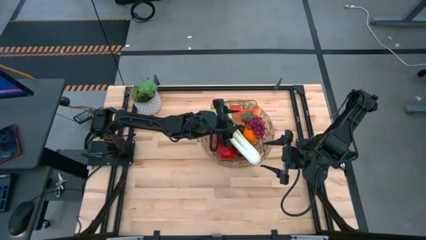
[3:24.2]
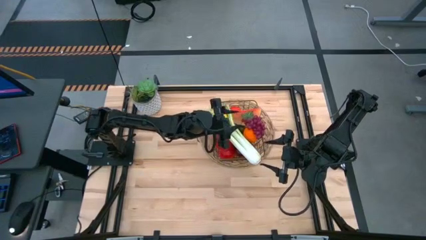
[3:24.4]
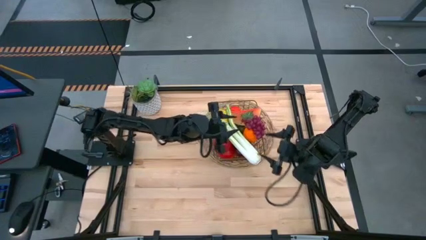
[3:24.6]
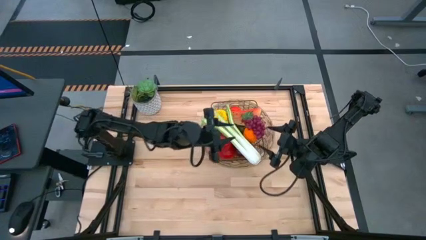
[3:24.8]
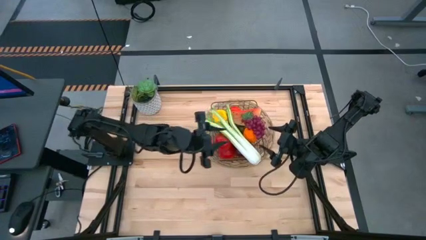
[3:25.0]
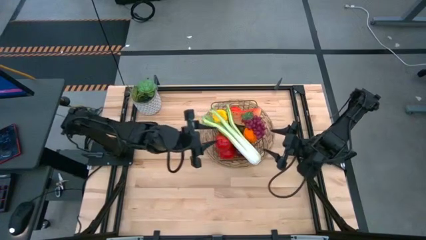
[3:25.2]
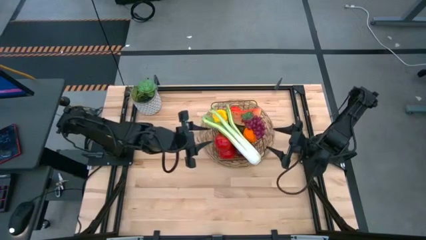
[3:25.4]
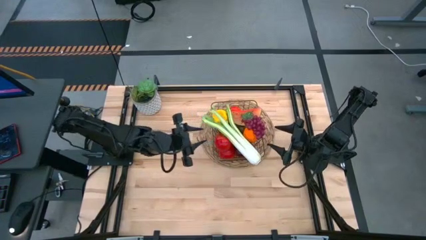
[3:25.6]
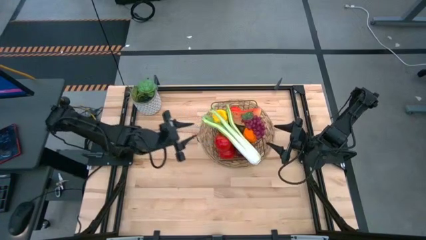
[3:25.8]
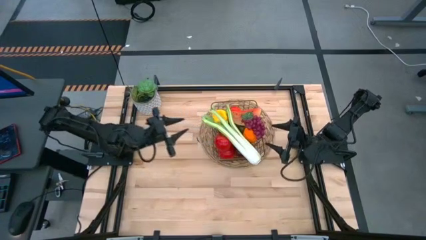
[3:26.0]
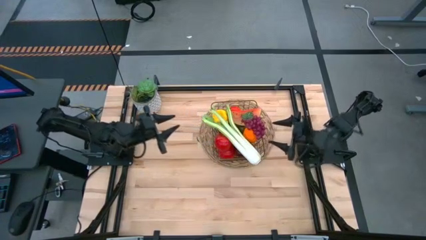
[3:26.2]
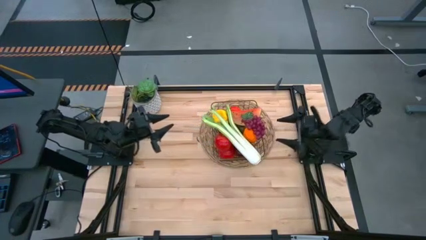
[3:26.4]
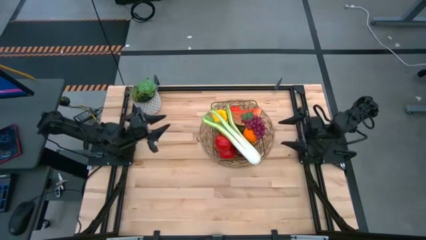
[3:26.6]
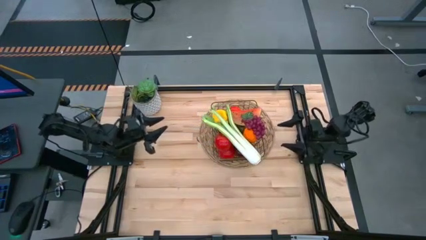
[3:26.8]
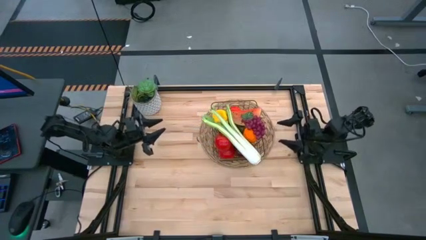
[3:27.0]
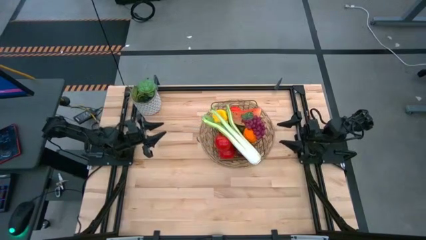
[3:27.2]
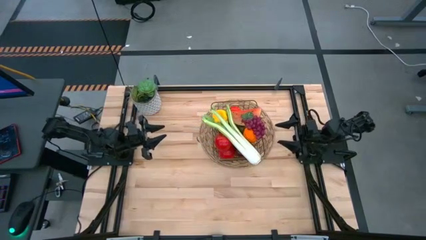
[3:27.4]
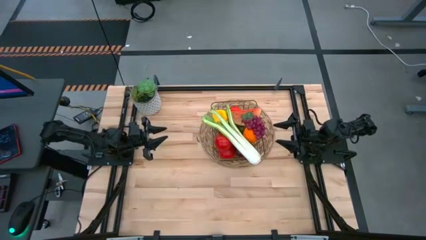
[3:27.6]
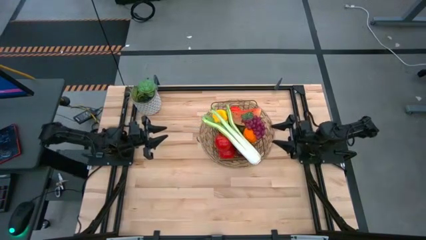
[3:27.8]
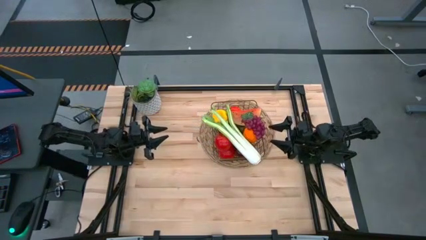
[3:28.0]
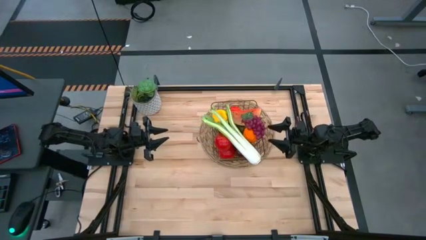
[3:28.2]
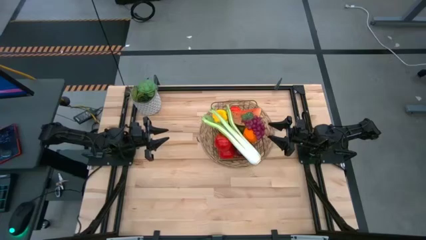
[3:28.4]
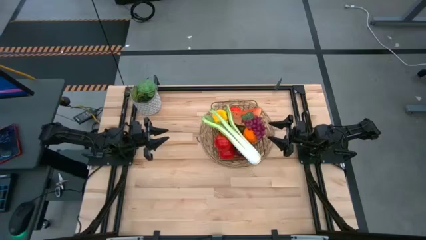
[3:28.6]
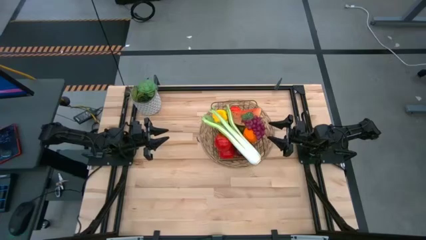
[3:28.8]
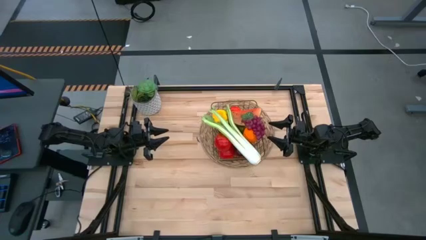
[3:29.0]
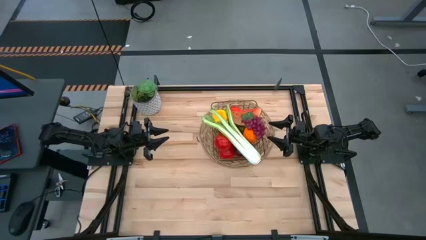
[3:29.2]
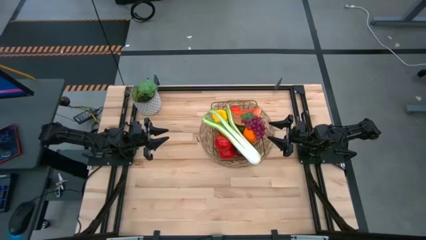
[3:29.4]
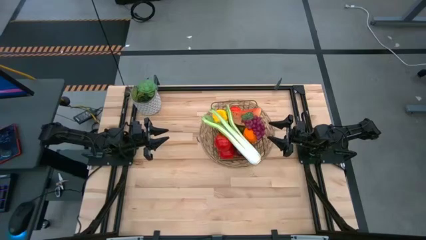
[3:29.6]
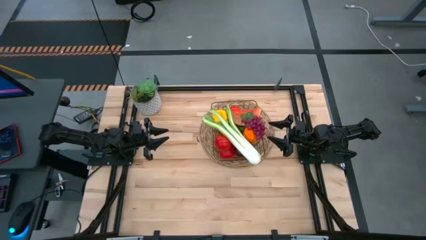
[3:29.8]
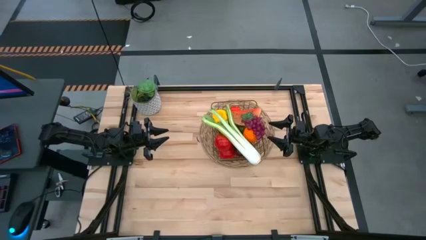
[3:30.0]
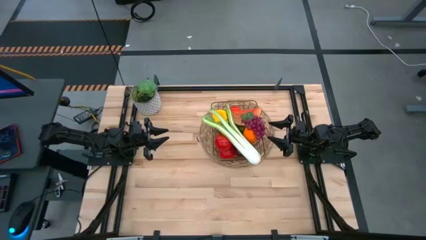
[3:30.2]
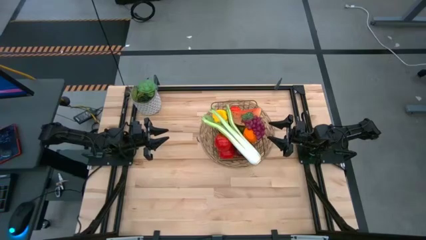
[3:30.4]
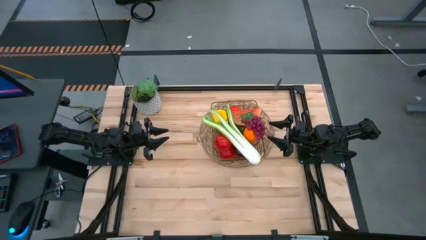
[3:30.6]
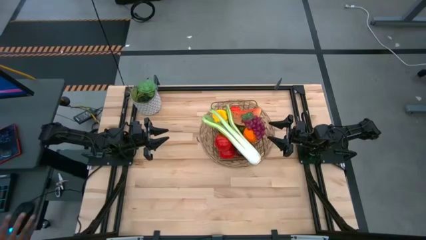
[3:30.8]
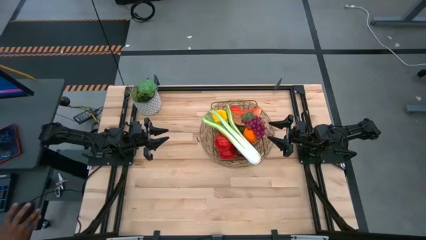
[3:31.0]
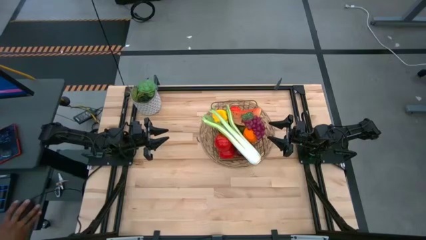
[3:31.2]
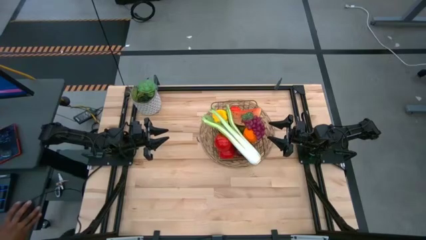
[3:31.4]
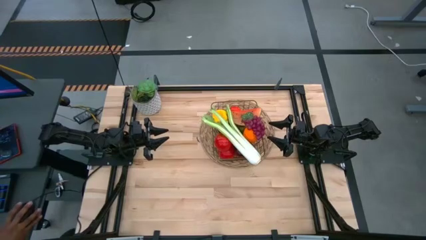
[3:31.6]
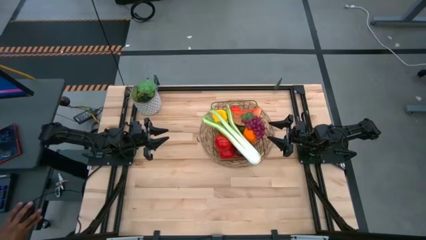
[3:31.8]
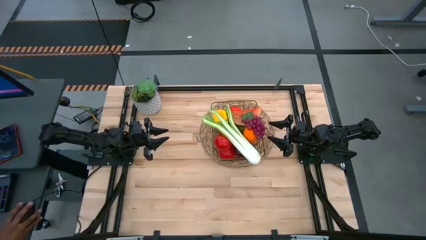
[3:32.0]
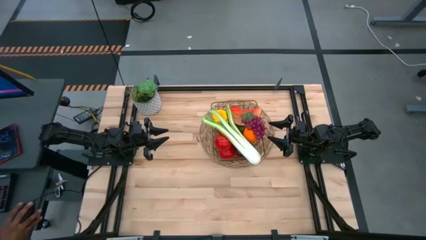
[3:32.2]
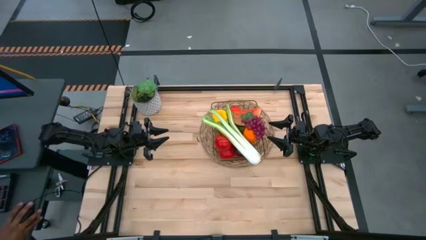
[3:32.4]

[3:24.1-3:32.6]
Task: Build produce basket
Return to Home position

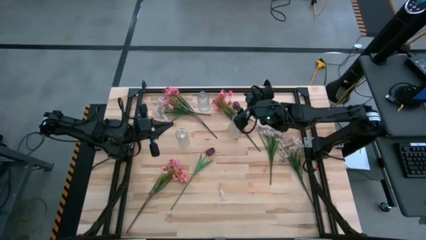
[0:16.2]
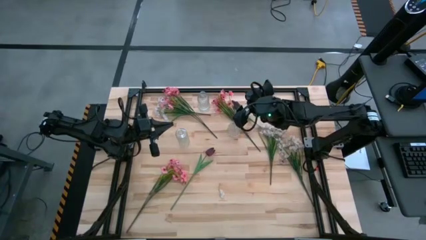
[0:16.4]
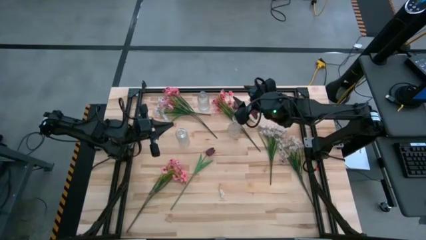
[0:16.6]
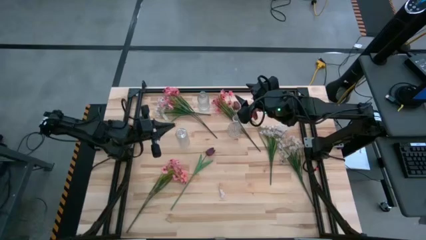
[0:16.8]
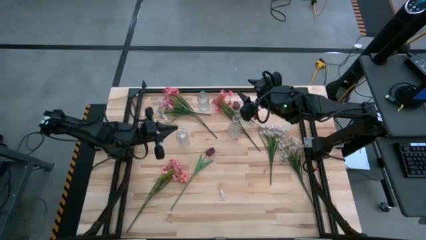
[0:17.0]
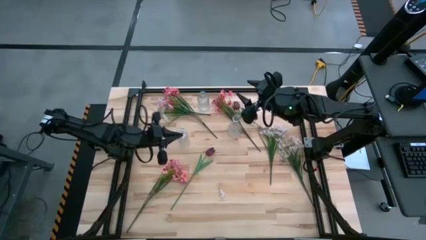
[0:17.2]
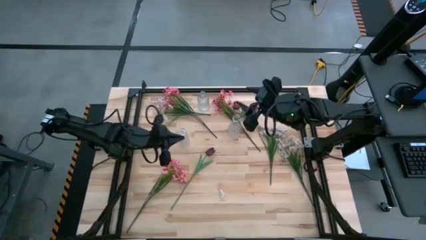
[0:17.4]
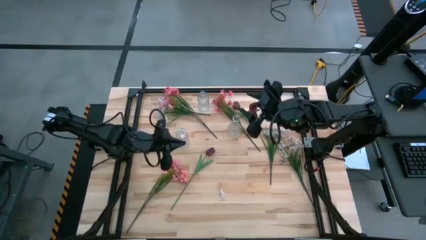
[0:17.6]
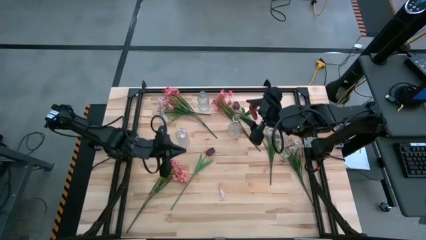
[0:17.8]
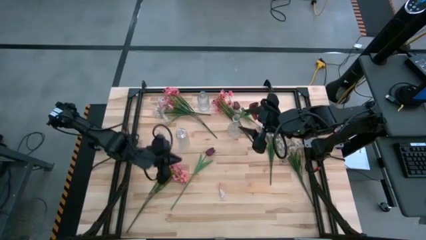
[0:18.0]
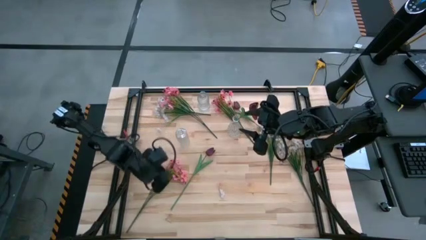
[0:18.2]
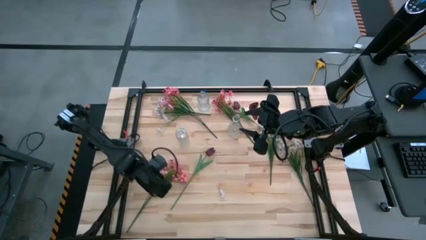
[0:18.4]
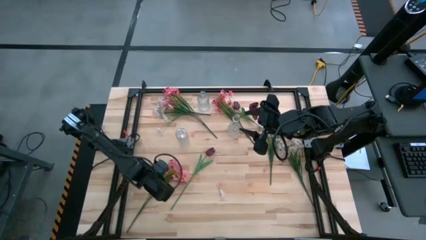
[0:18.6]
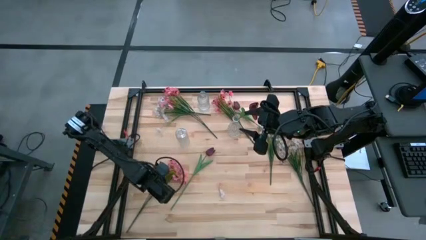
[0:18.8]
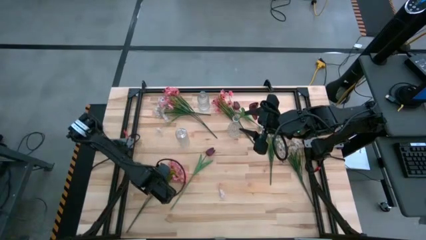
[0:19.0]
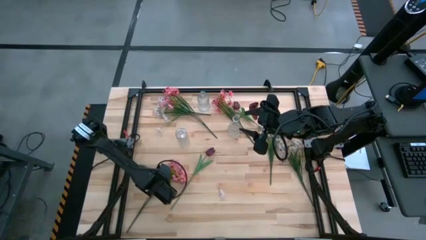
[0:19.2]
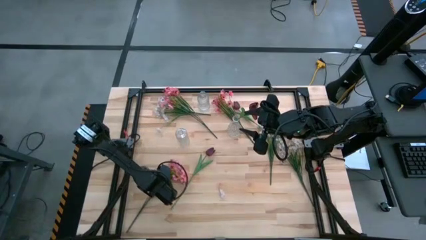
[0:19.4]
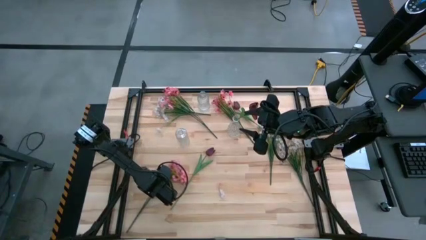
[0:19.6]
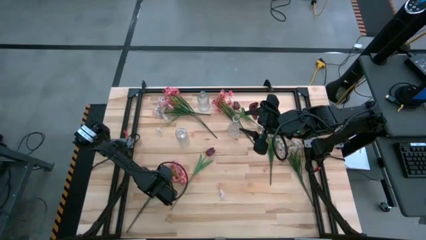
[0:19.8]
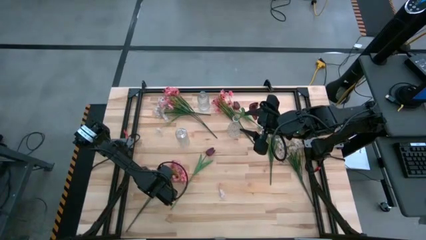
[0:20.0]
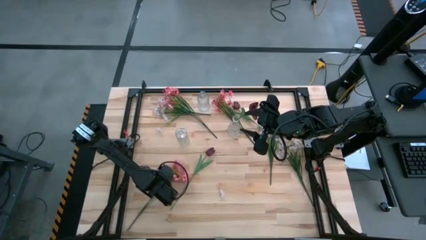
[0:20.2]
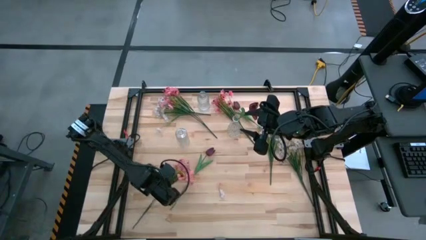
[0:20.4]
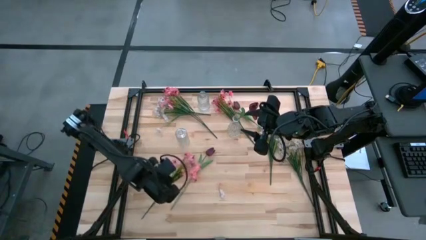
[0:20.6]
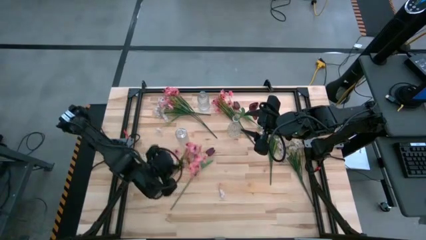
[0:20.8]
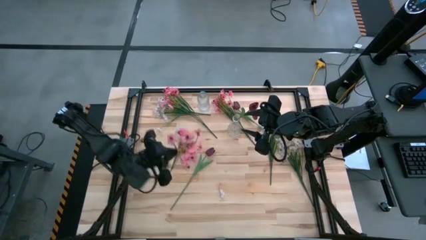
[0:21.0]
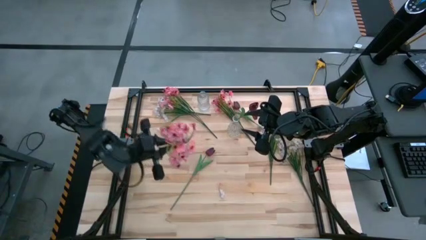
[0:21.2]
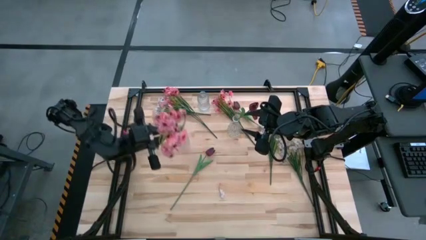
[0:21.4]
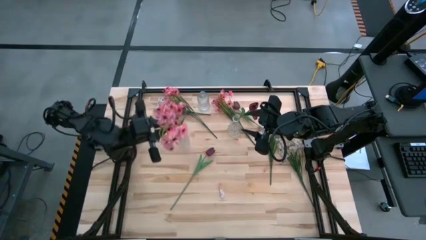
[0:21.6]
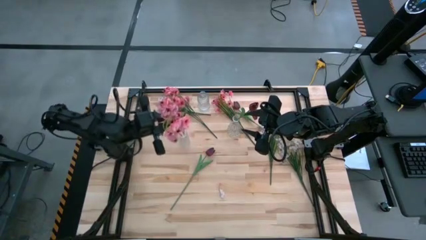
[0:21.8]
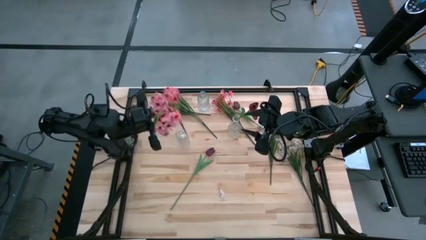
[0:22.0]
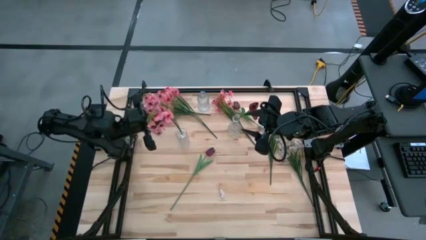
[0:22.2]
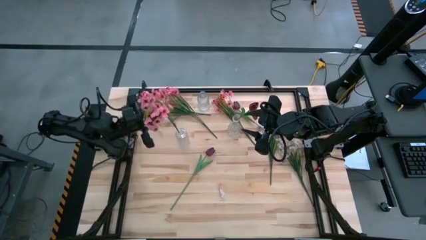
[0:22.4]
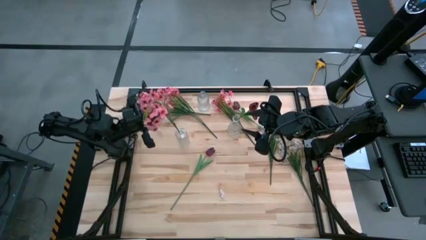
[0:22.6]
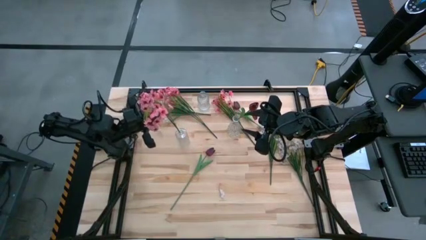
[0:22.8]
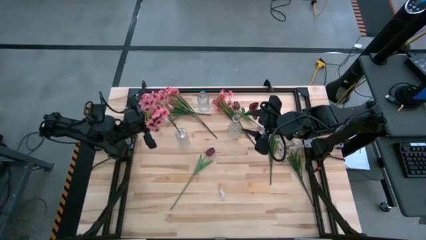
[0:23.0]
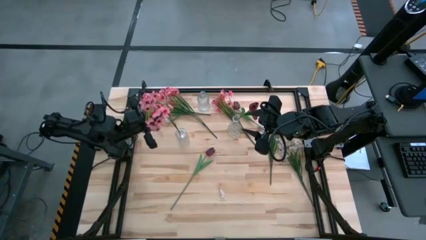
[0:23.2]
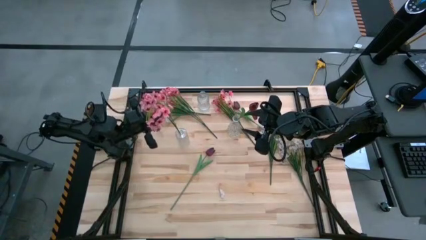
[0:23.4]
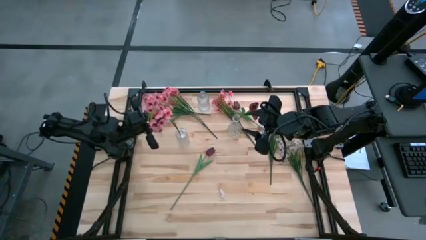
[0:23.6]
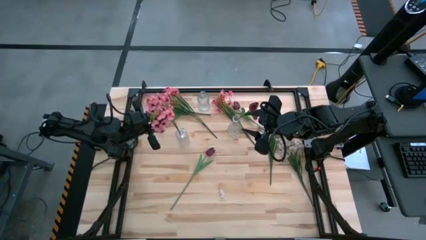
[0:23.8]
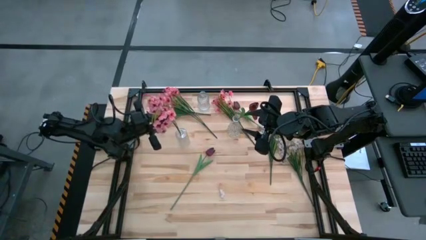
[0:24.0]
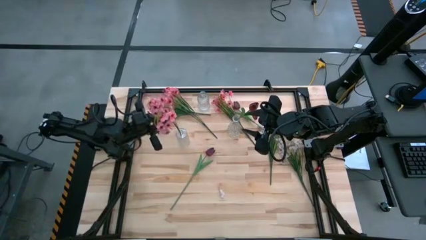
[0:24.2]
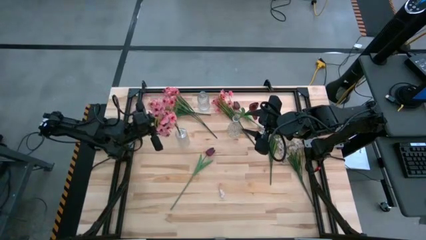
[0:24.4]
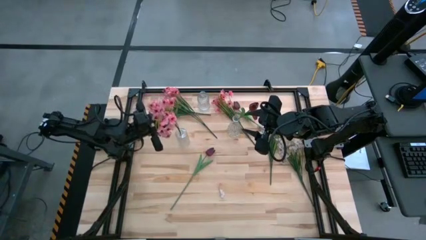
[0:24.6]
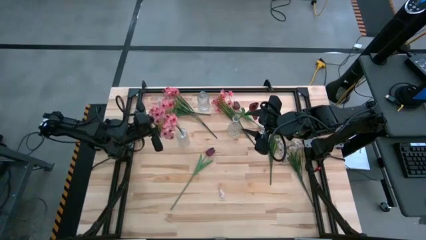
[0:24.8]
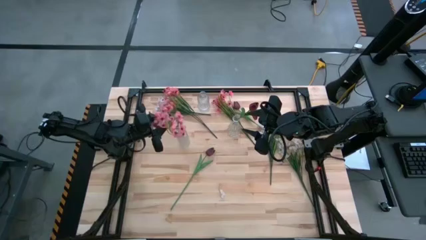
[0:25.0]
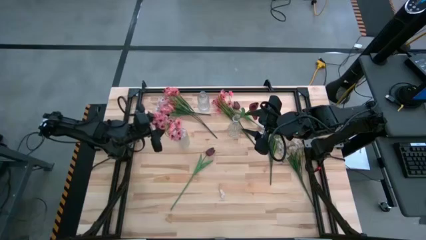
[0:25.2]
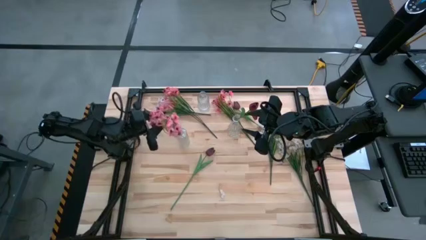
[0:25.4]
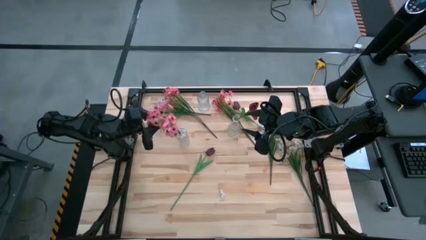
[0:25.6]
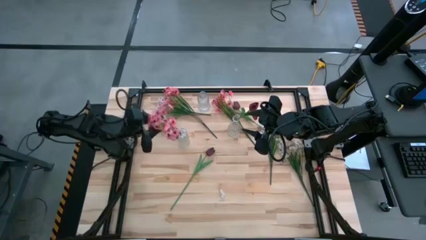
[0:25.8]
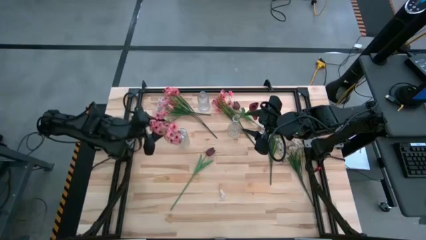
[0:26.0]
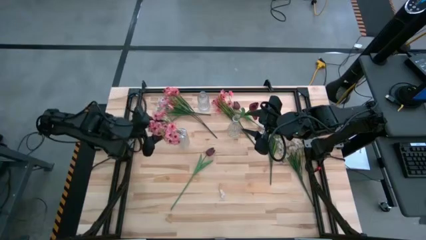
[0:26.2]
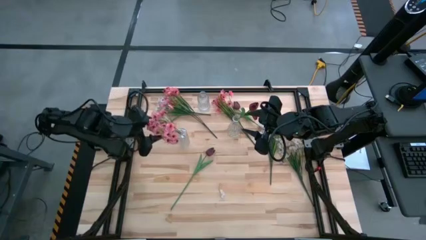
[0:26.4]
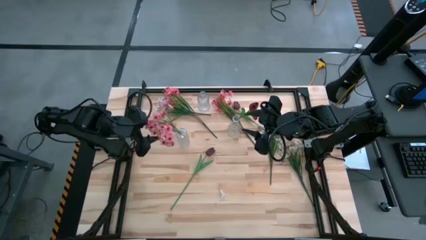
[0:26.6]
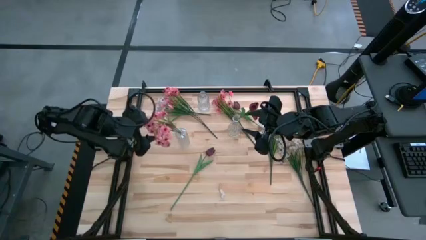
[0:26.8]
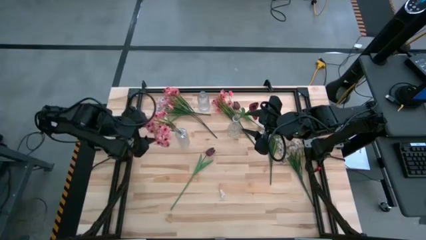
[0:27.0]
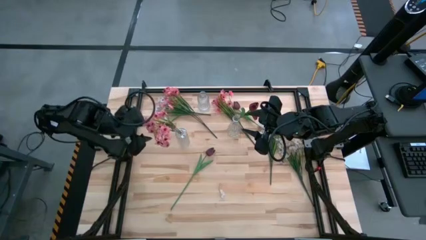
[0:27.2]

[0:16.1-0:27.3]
Task: Sort flowers into vase by color
Put the bottom pink flowers into the bottom left transparent vase
